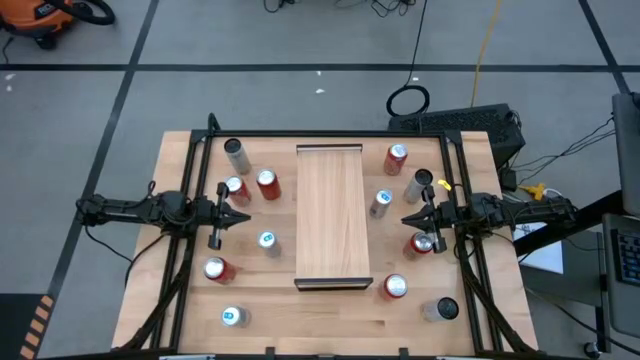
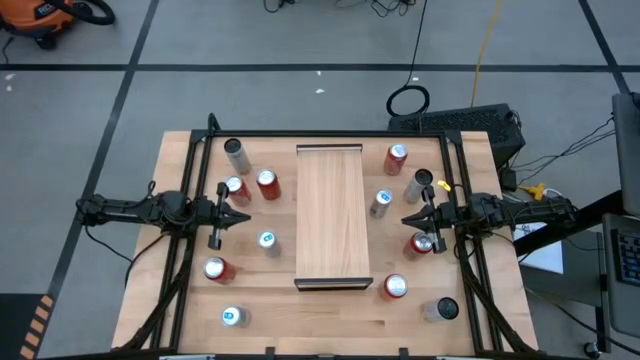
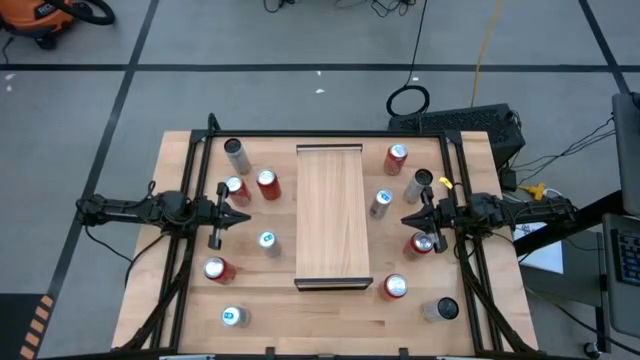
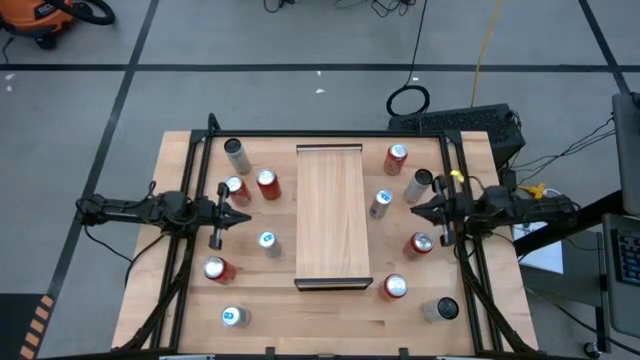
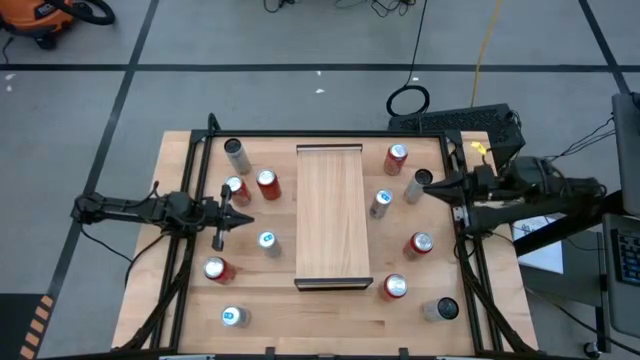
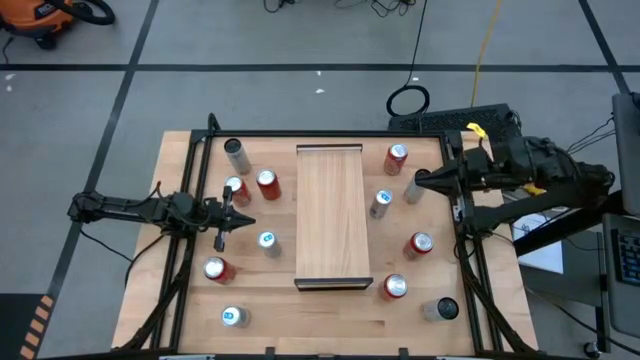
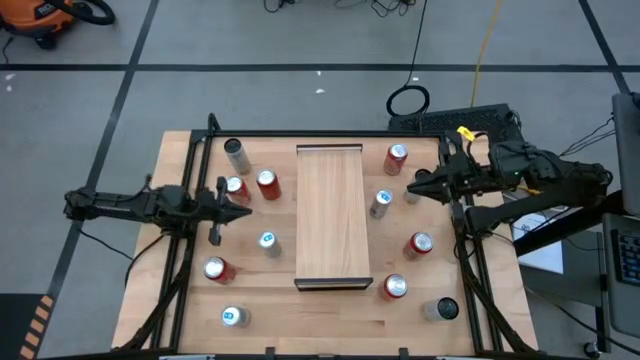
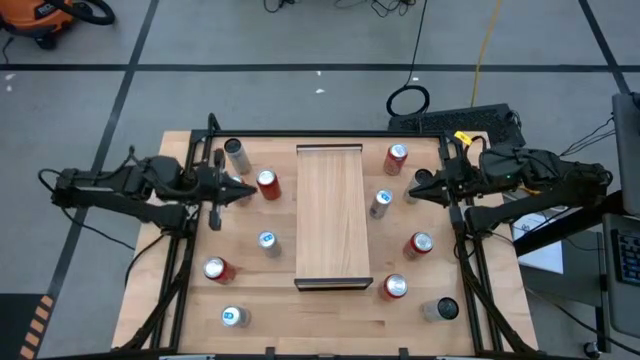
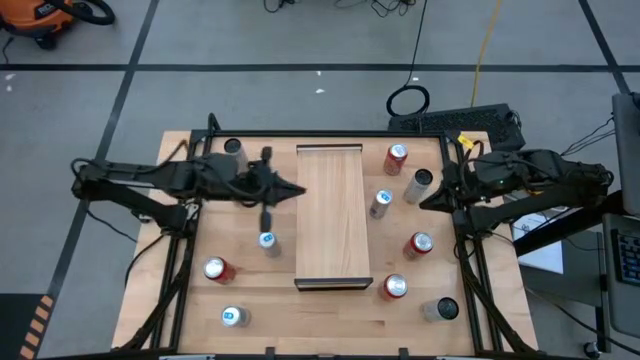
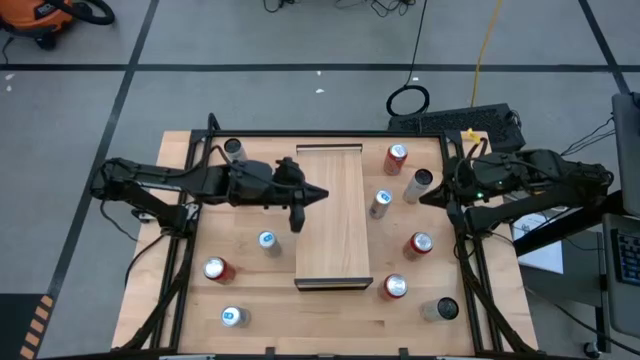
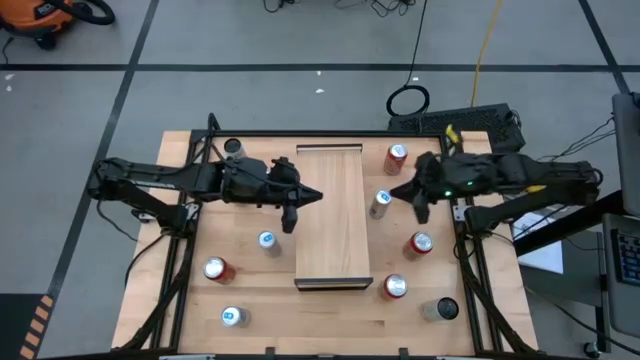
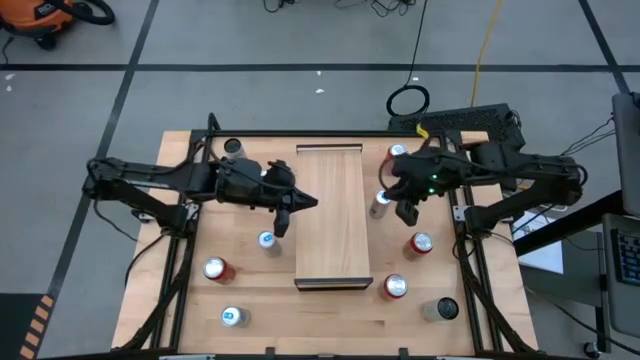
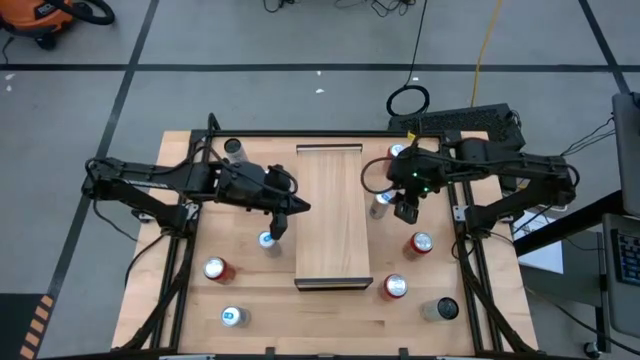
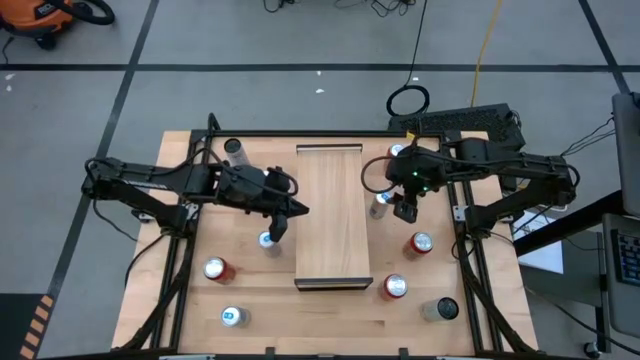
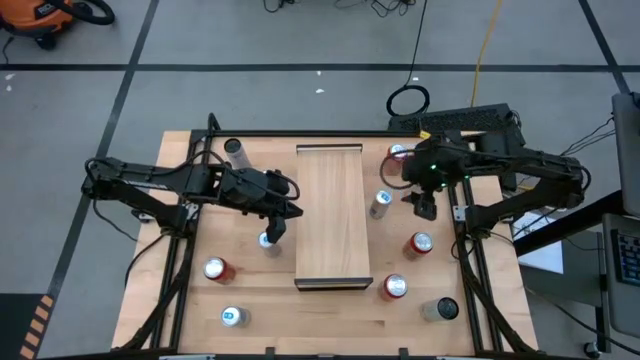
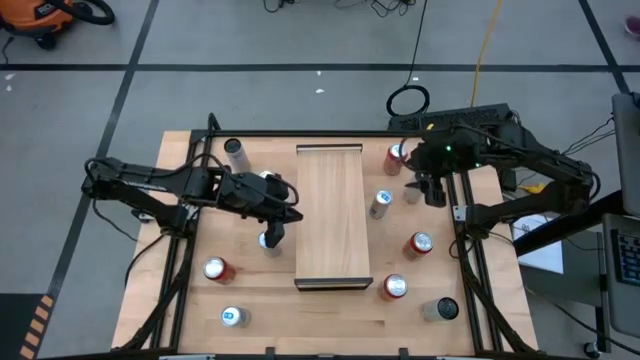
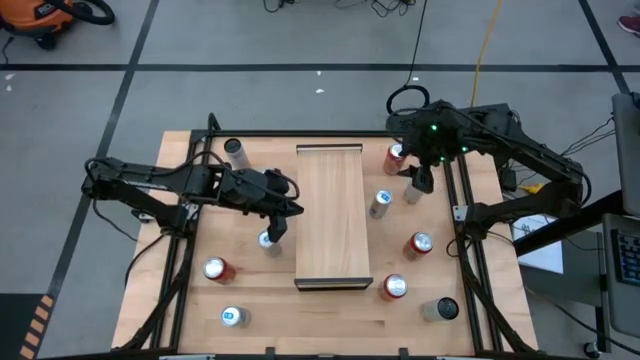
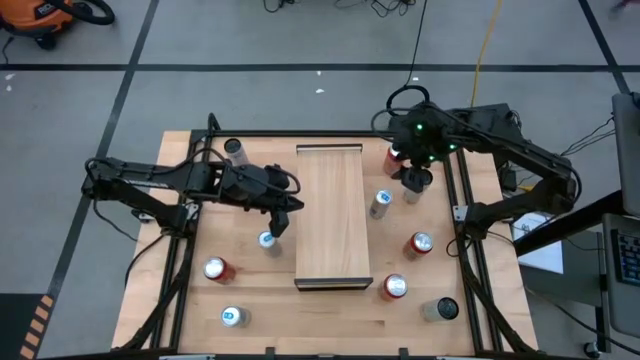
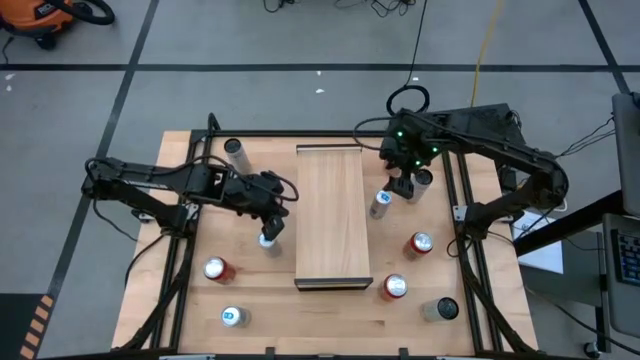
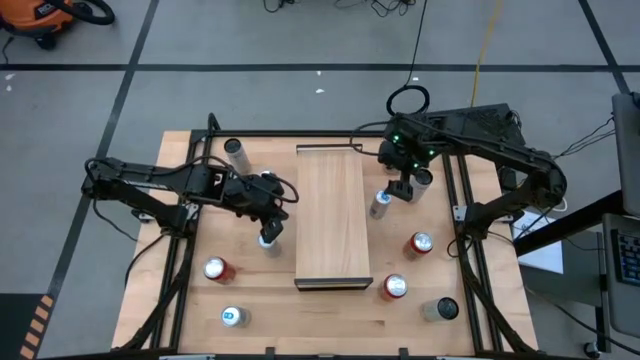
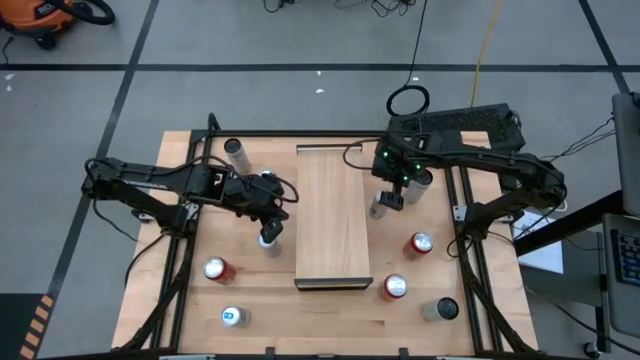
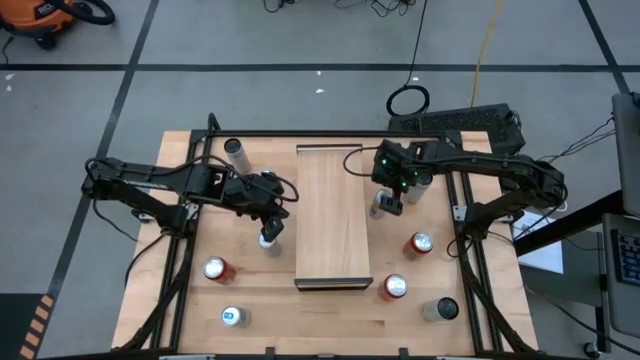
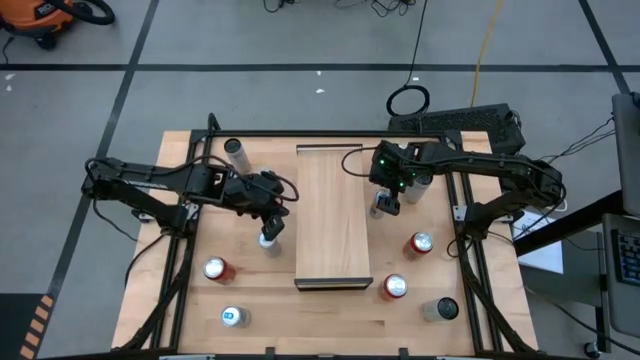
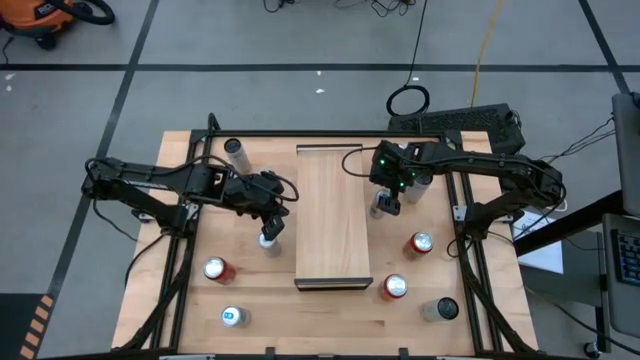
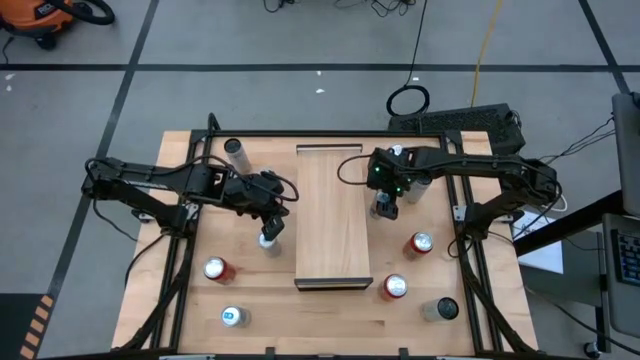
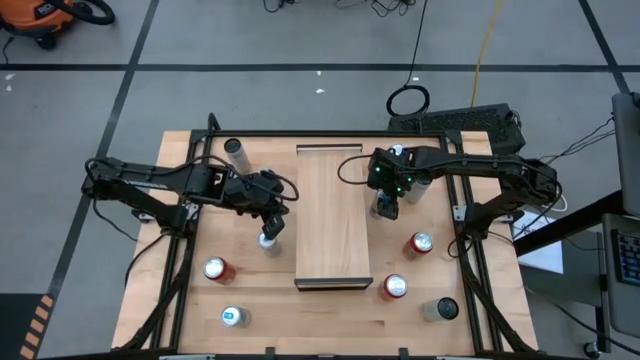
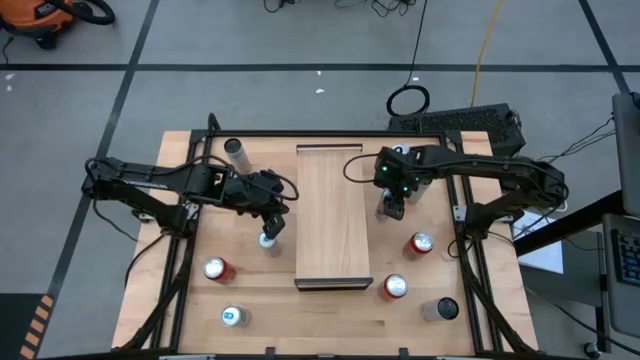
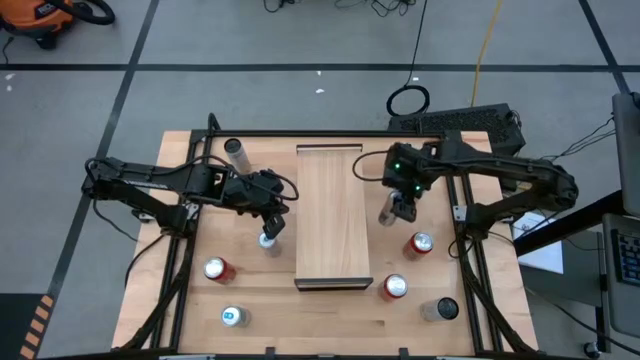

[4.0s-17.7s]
Task: Place canned beverage on shelf
Put the top right blue soda can on the shelf

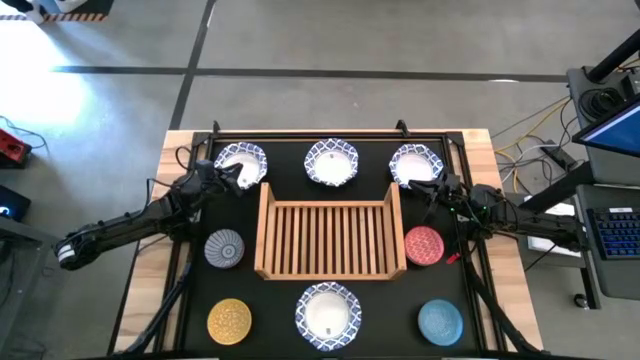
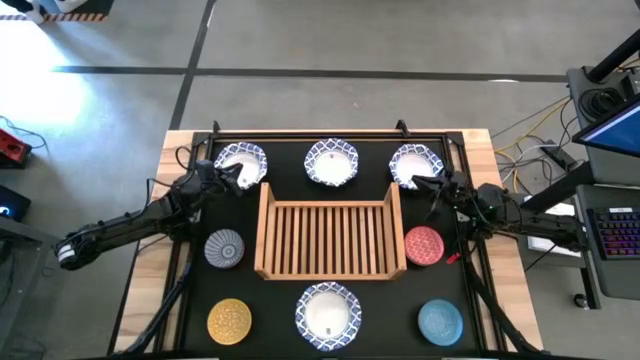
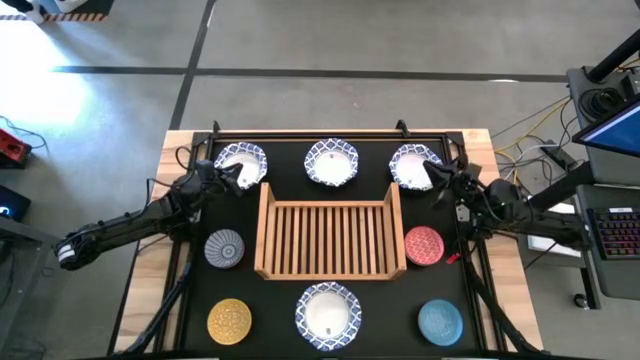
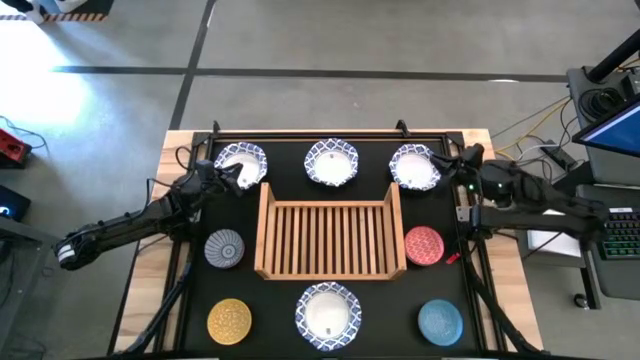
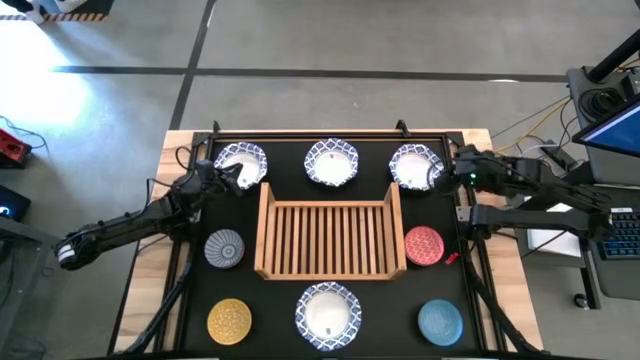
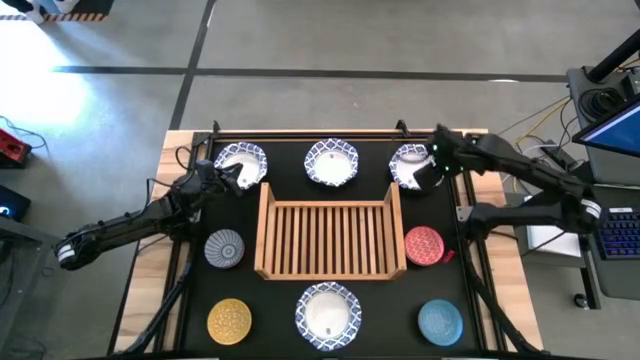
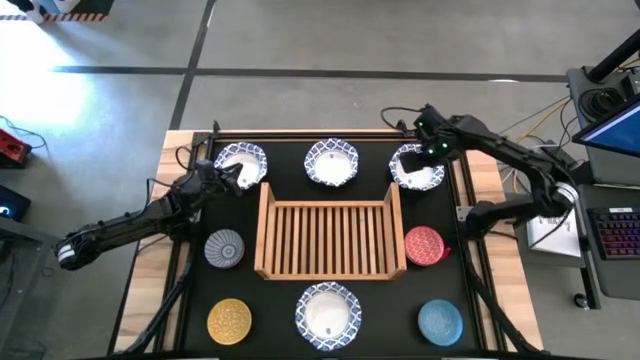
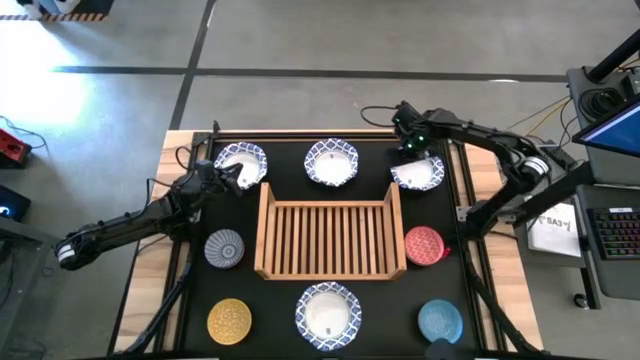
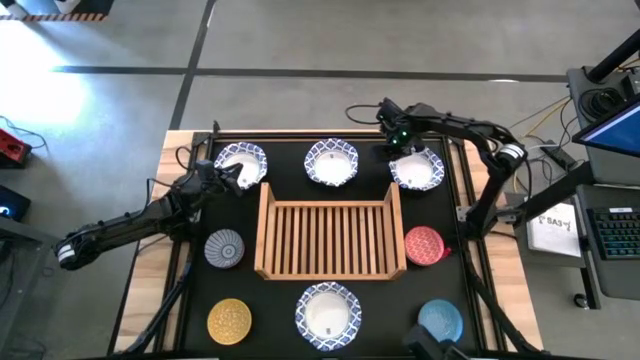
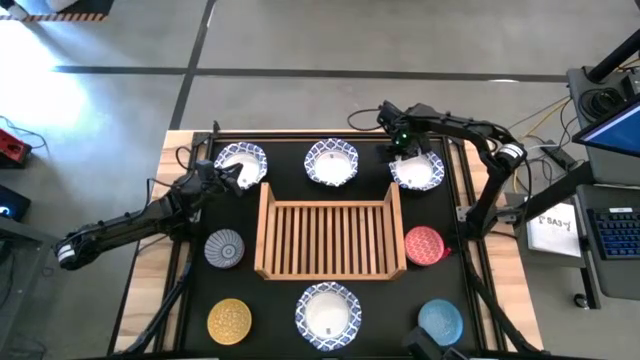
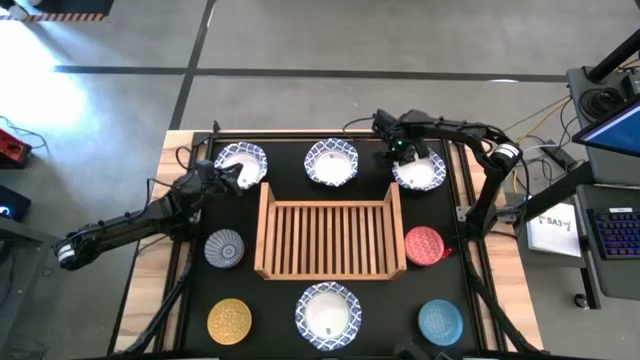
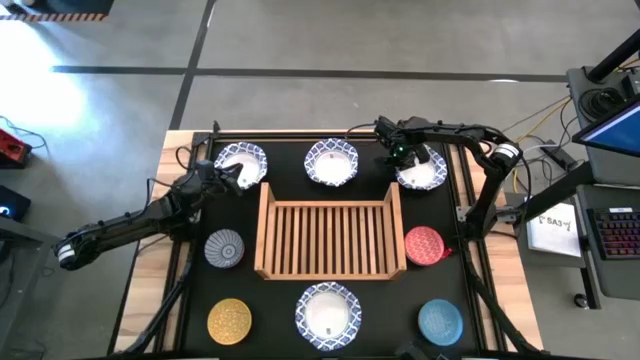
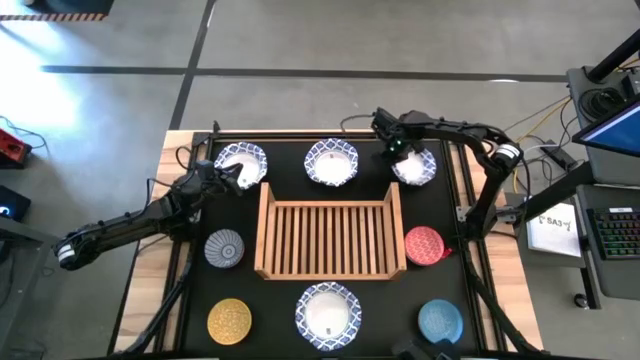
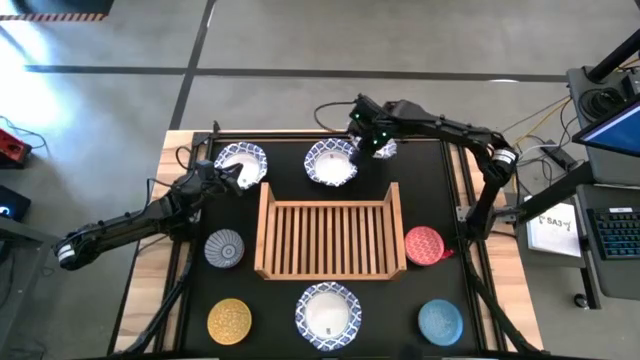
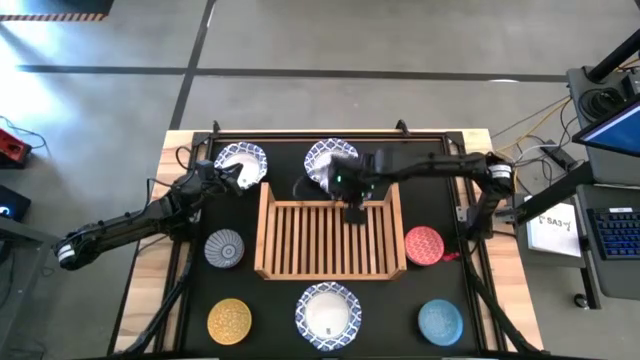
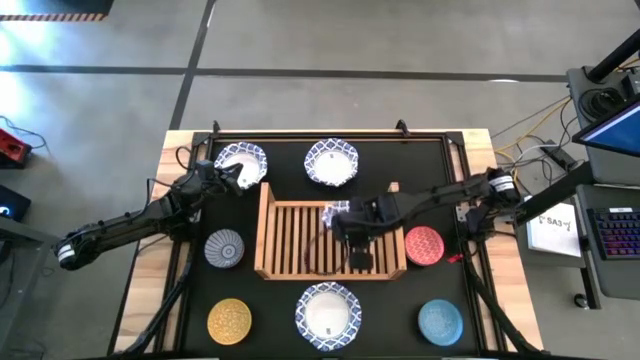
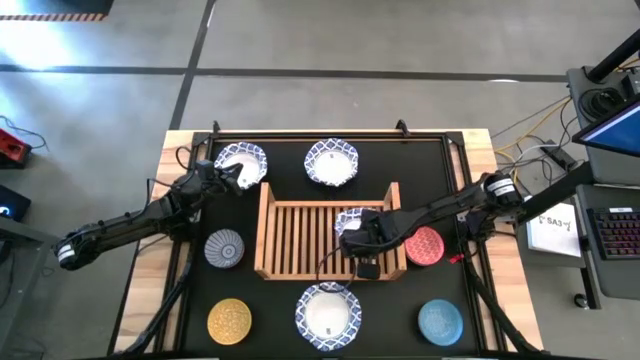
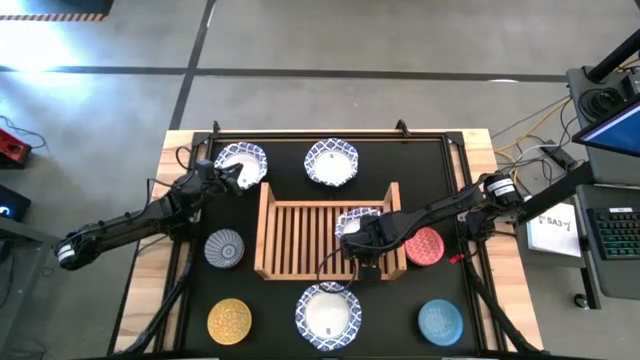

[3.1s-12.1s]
Task: Place and stack bowls onto a shelf
Put the top right white bowl on the shelf
